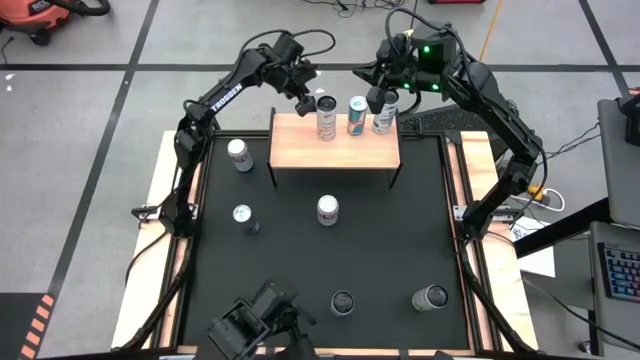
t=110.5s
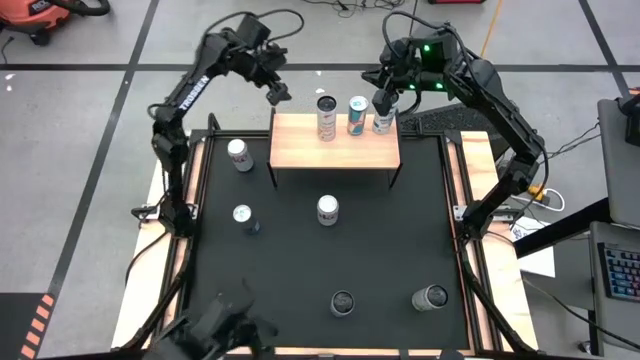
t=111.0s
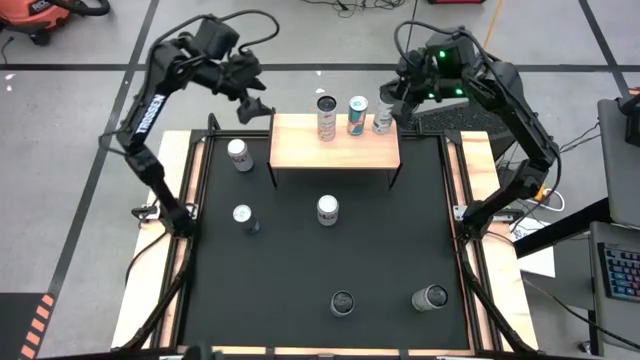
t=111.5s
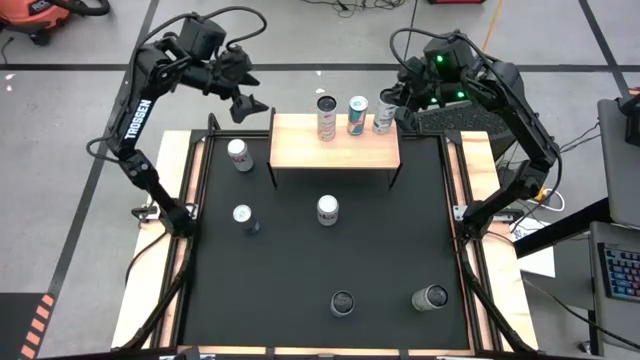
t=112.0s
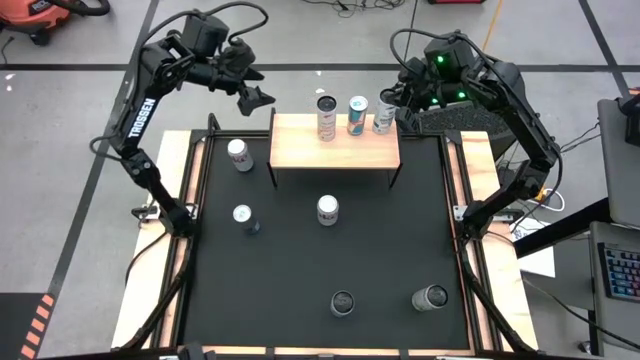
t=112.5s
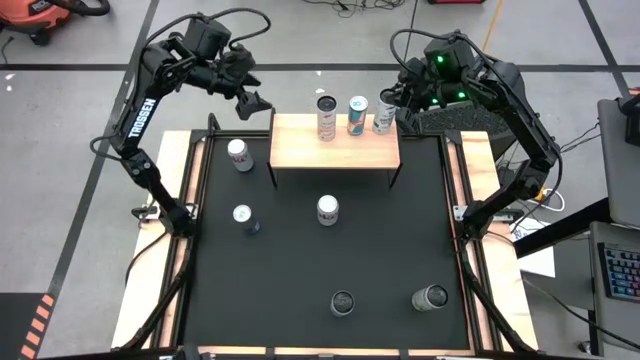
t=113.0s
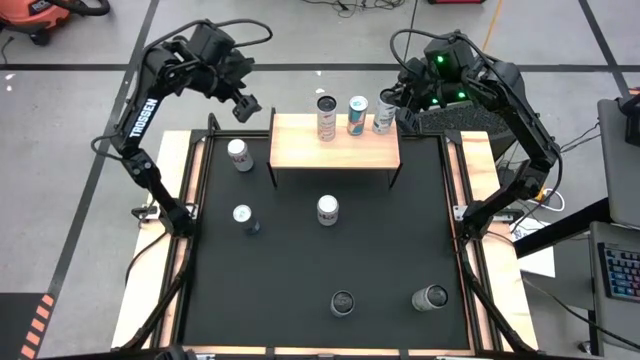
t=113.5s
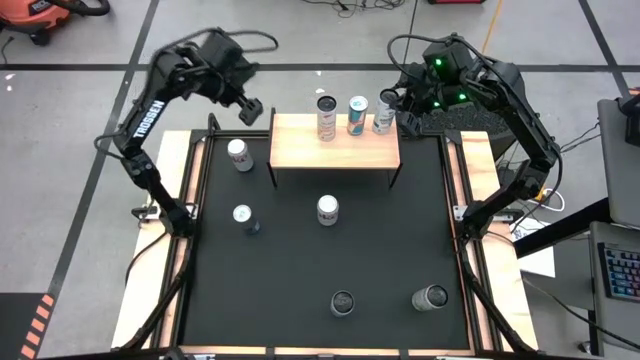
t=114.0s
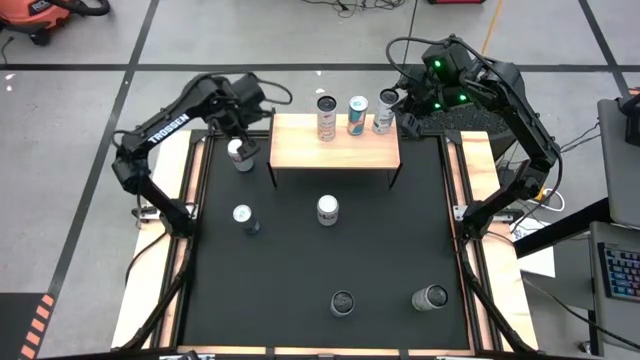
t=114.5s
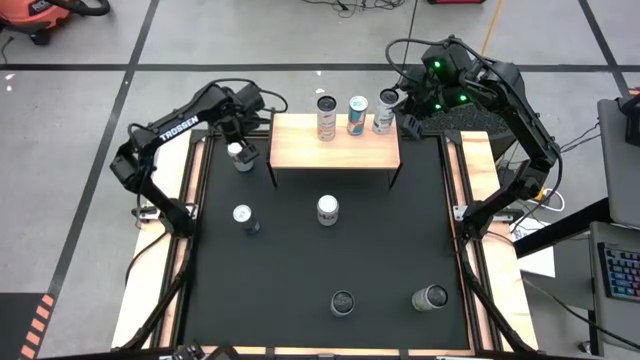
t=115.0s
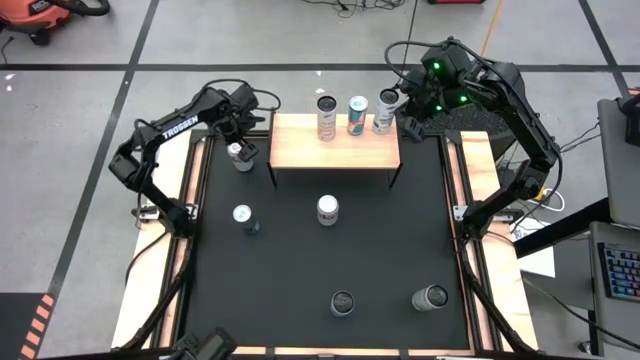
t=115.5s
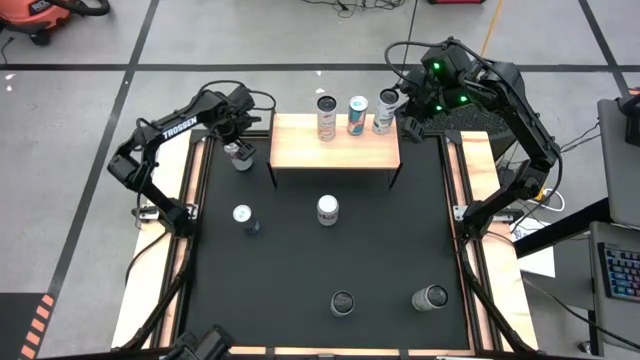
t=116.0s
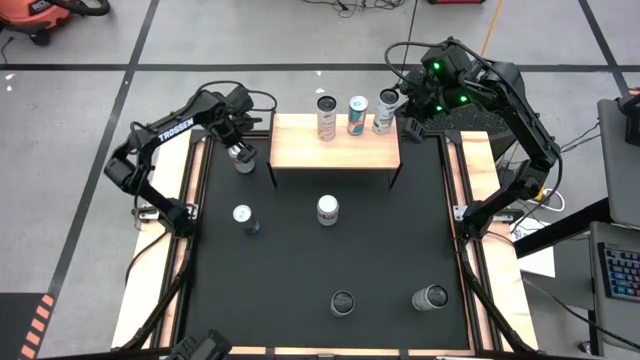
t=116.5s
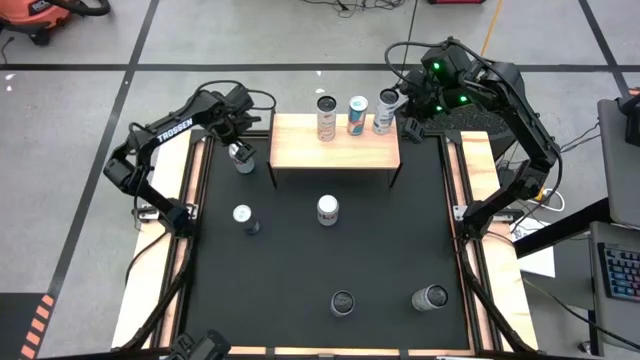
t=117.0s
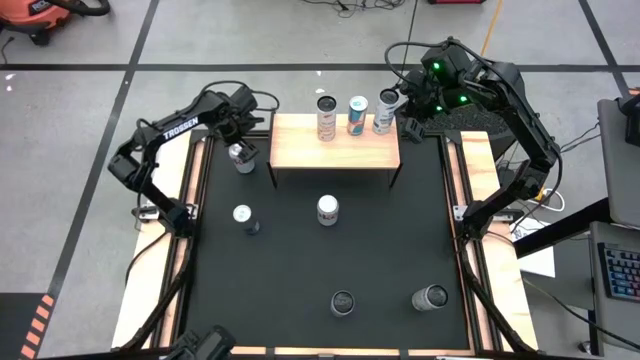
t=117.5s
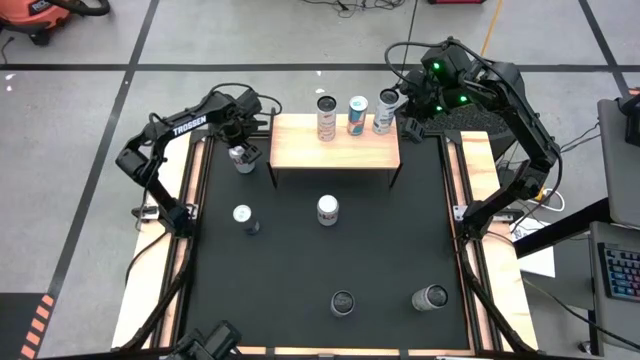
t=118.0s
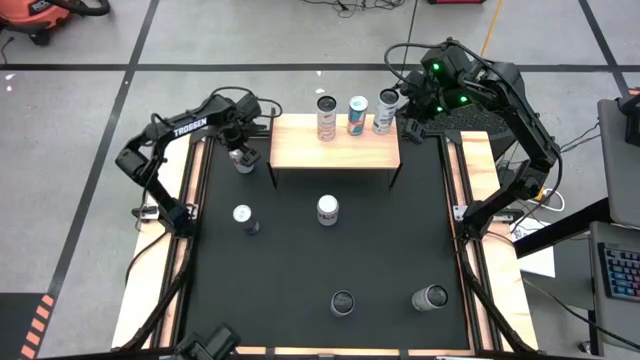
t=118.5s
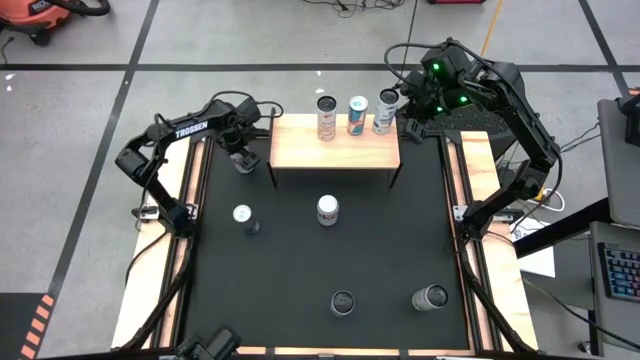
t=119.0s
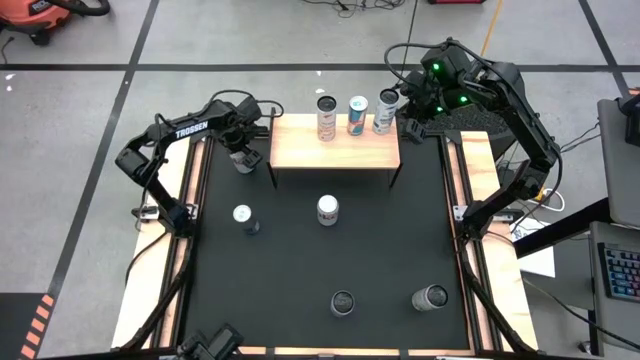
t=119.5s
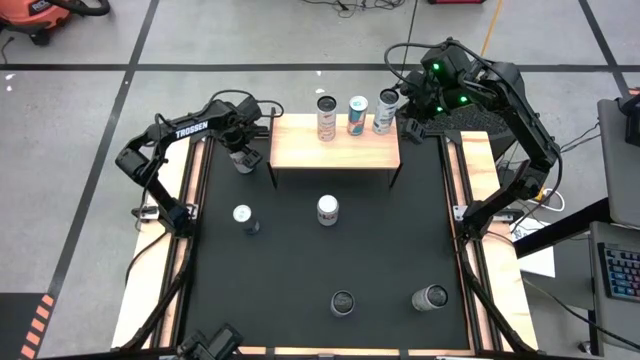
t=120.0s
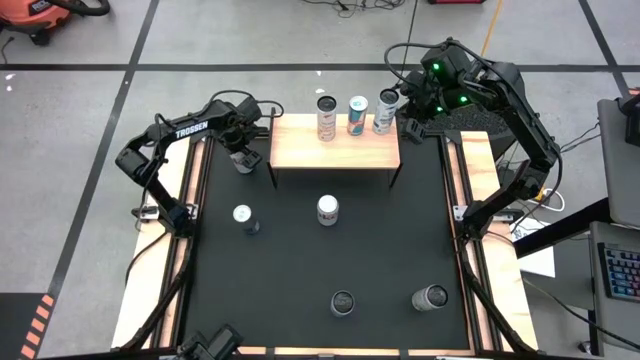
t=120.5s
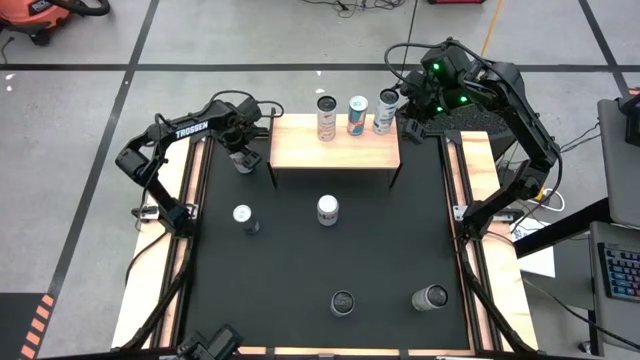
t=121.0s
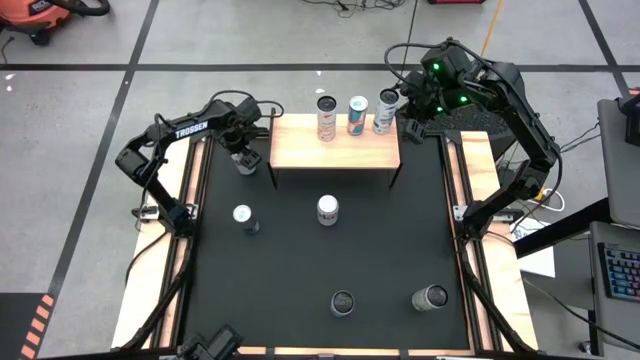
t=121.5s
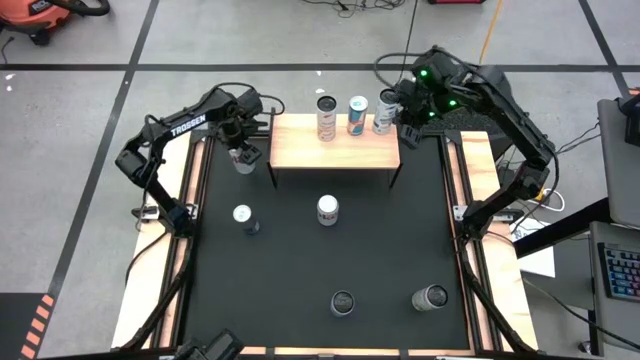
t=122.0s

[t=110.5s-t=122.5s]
Task: Place canned beverage on shelf
Put the top red and silver soda can on the shelf

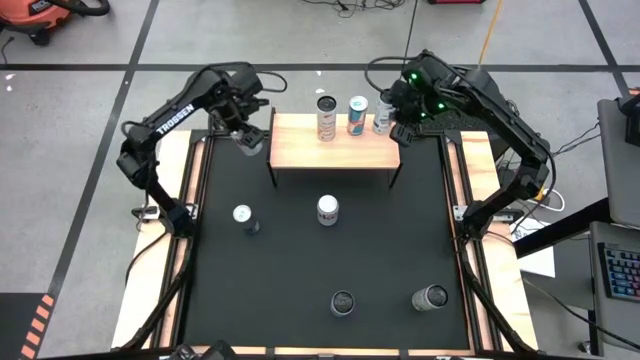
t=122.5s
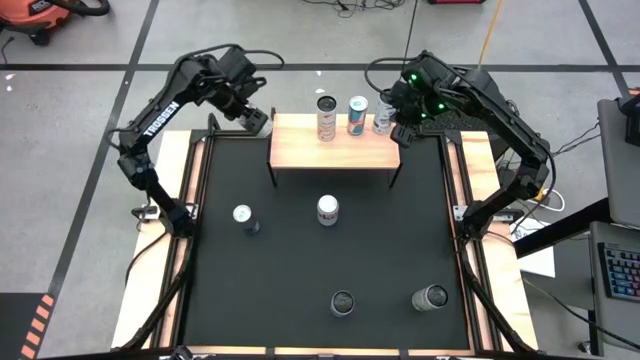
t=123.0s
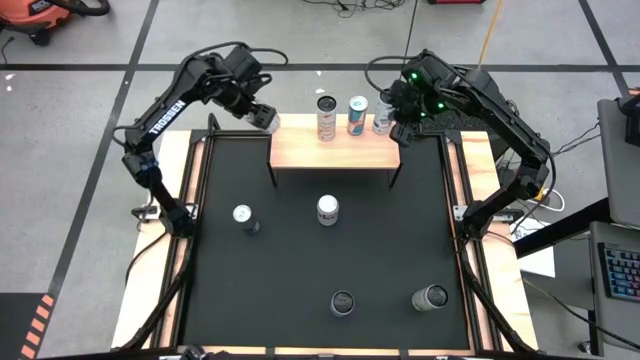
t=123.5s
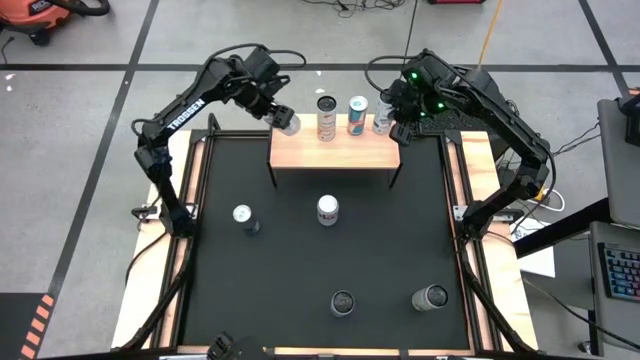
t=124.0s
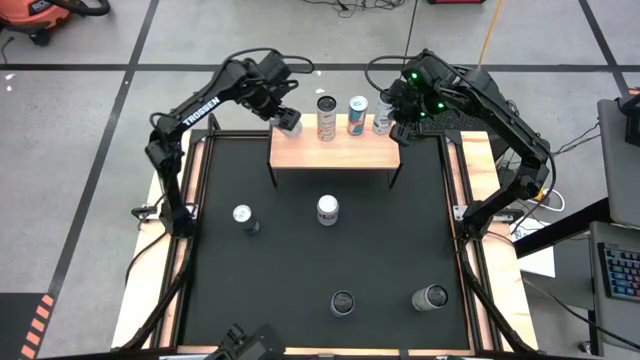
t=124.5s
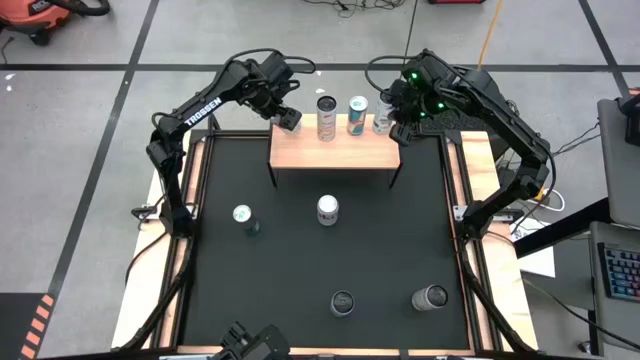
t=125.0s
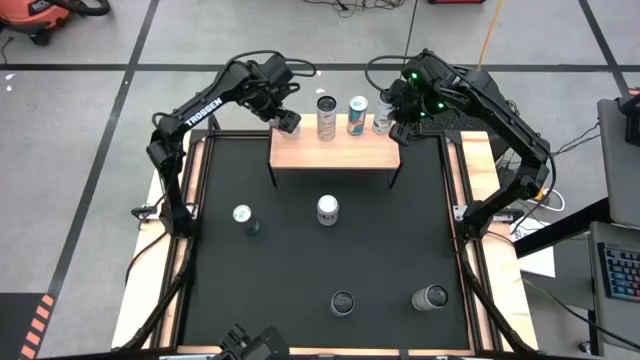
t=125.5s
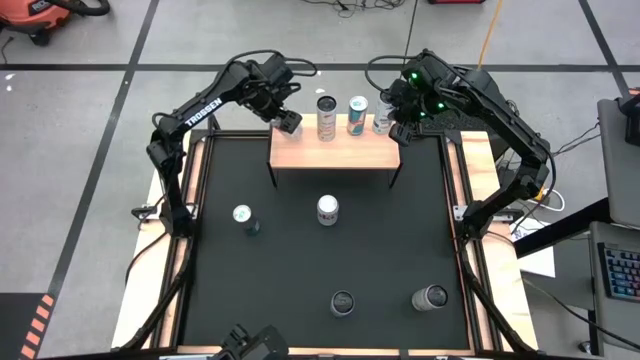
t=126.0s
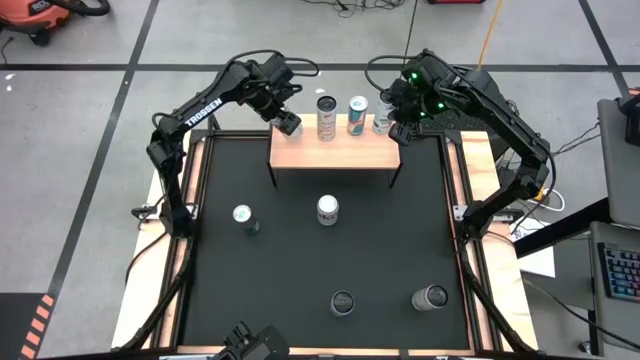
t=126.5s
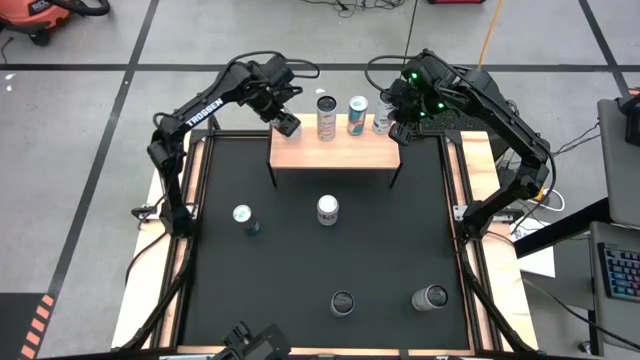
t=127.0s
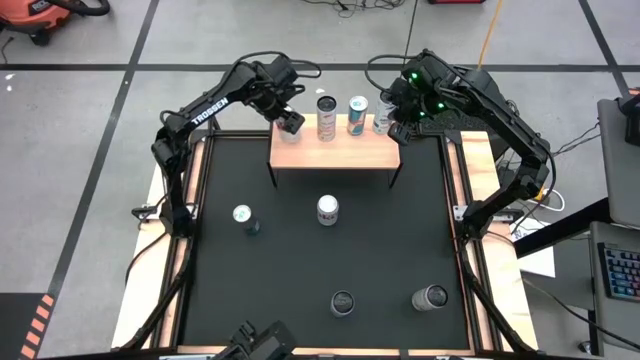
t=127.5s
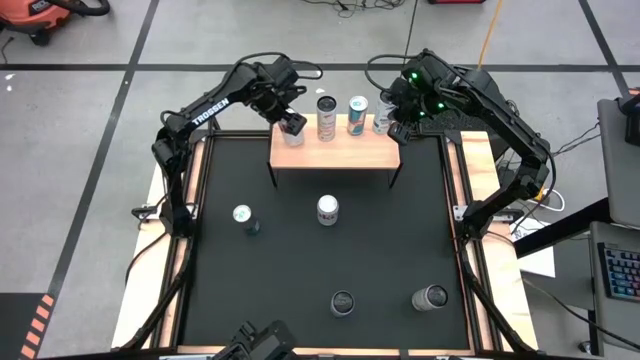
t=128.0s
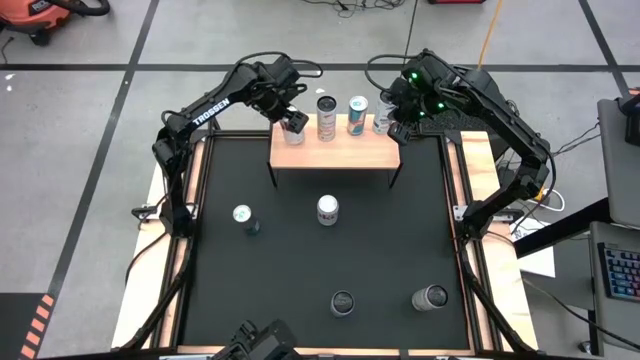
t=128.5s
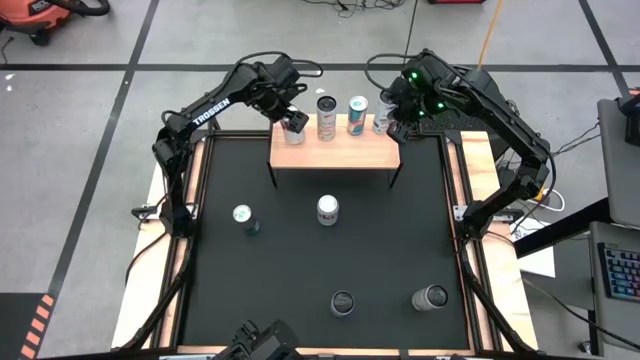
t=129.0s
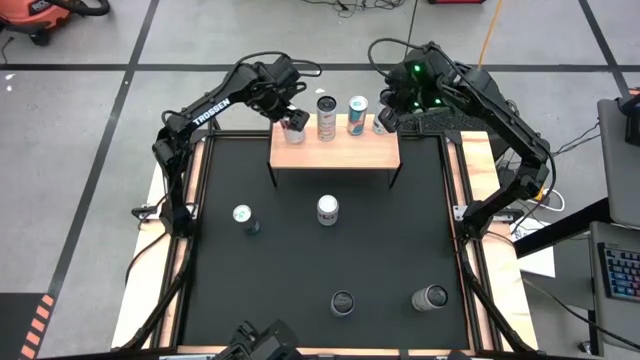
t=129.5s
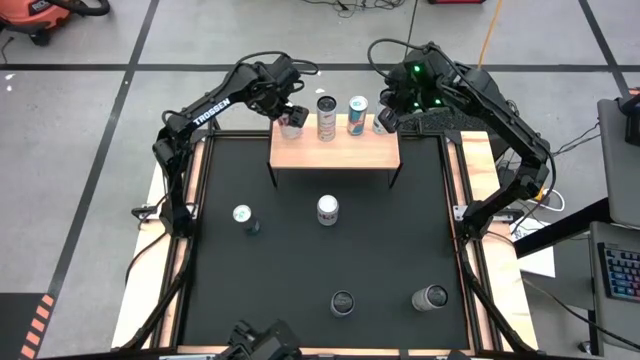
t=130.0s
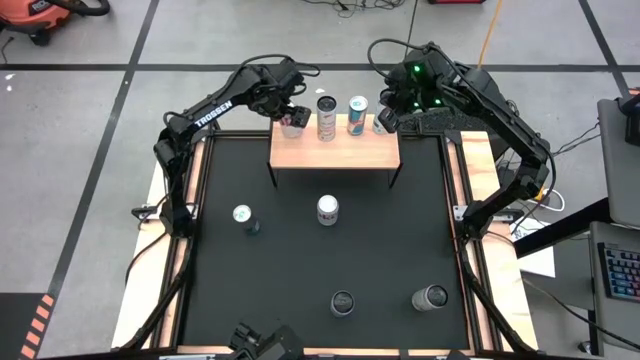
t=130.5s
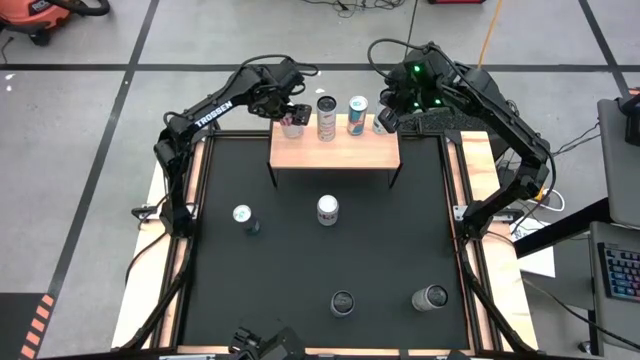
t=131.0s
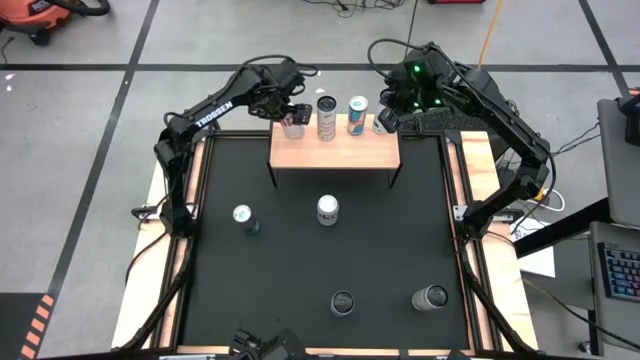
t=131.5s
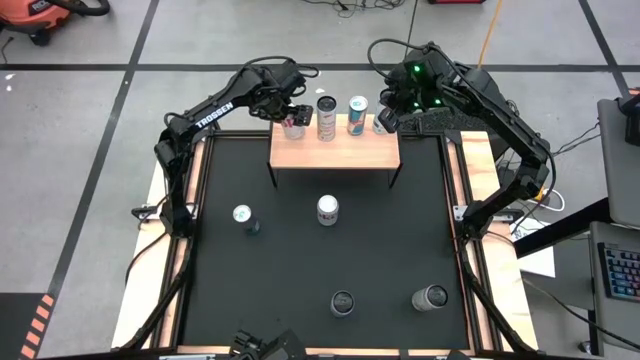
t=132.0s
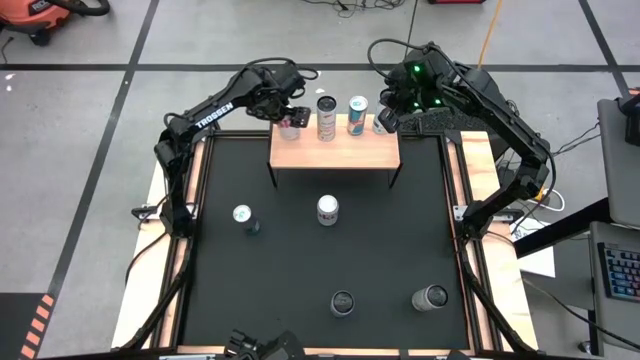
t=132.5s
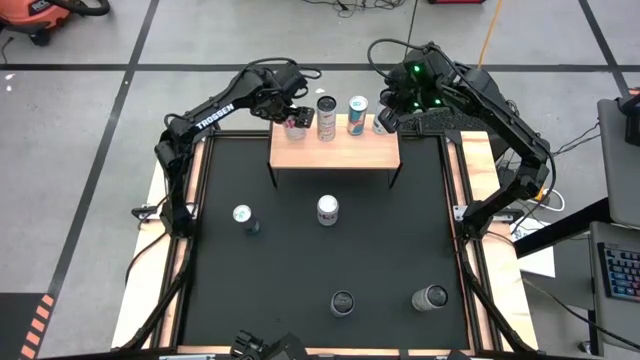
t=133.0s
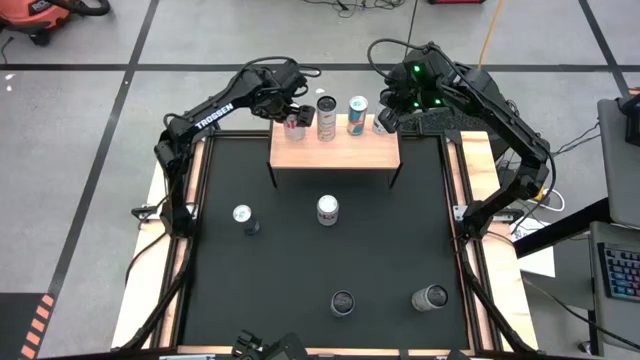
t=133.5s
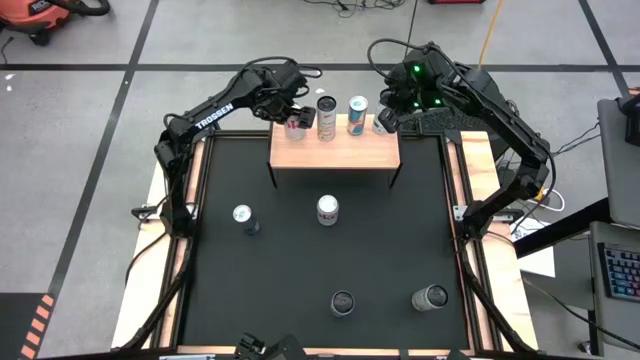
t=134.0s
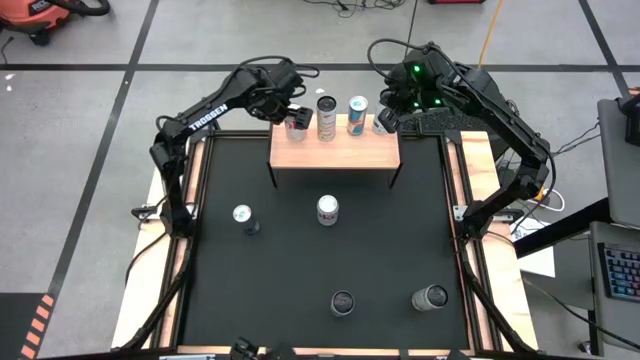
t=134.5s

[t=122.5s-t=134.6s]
Put the top red and silver soda can on the shelf
